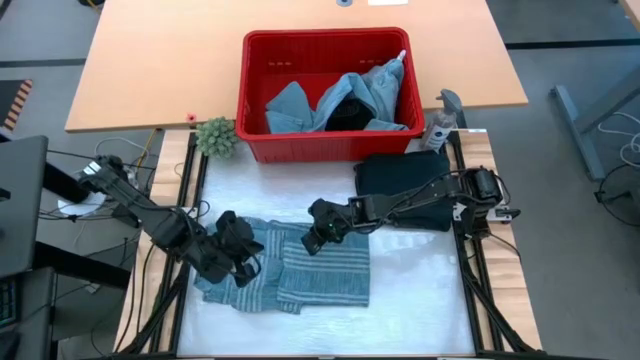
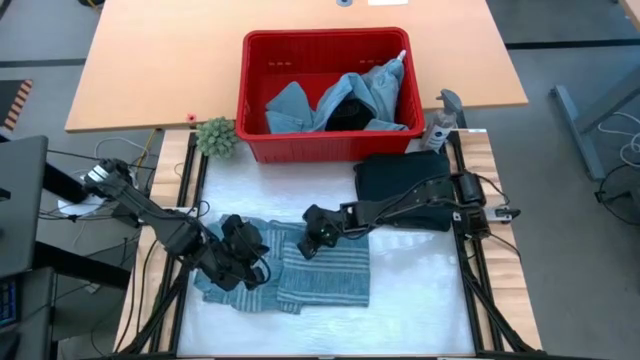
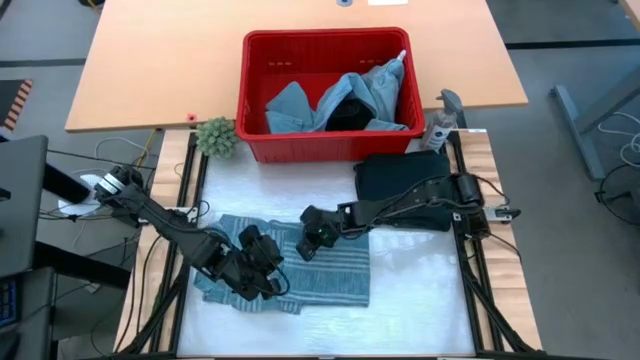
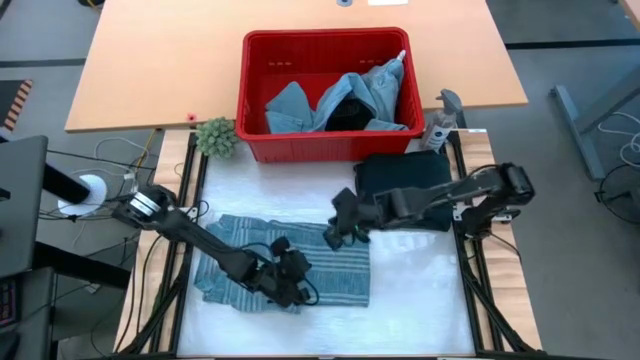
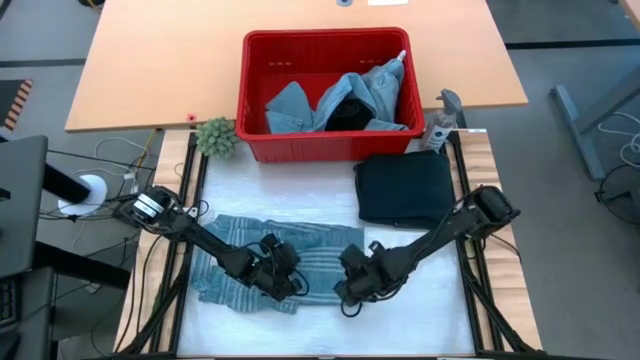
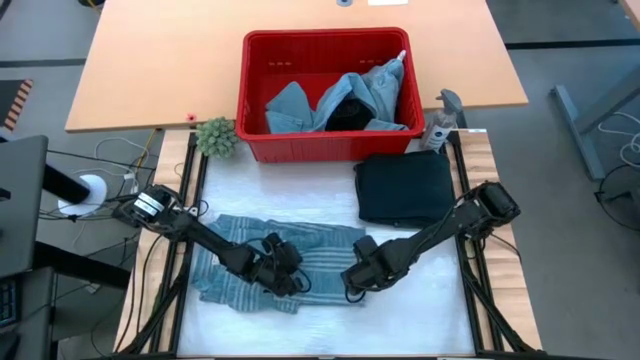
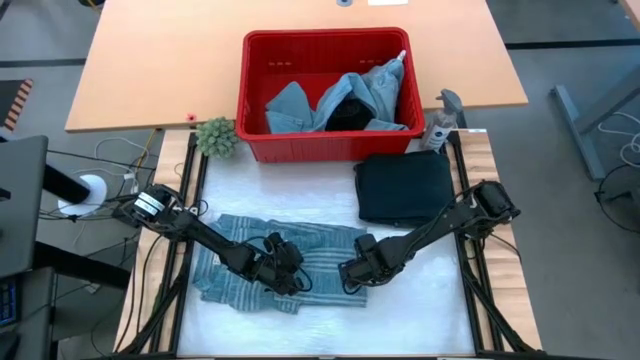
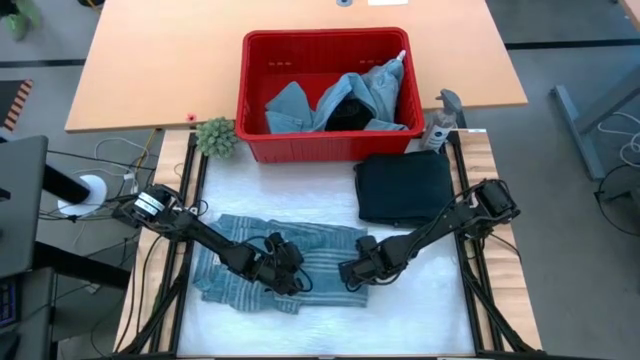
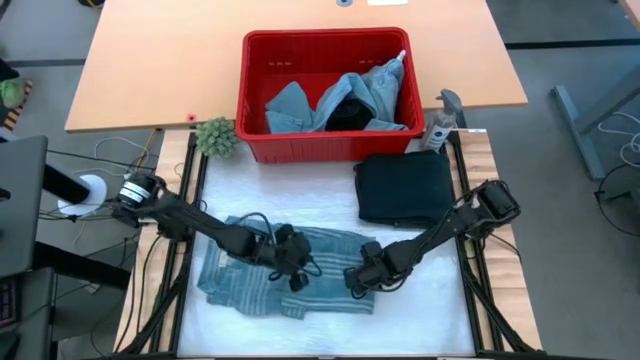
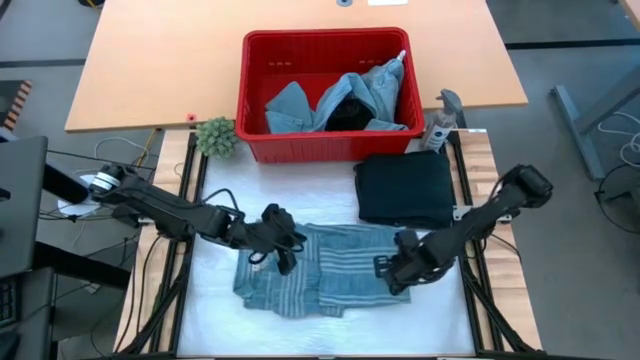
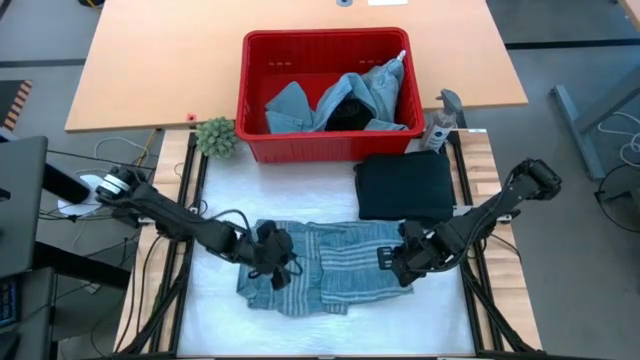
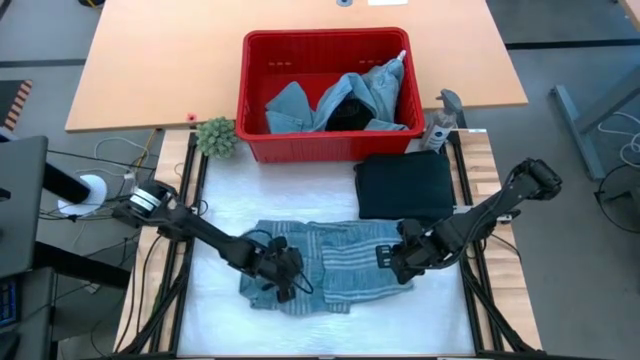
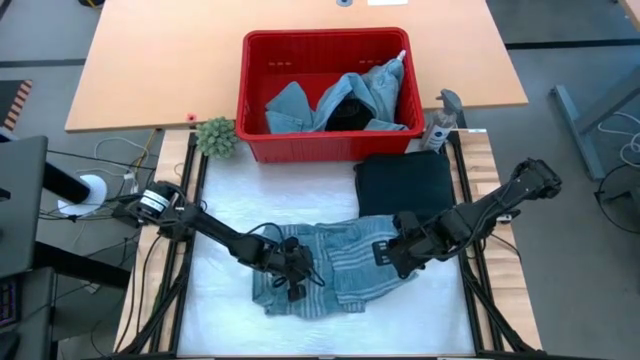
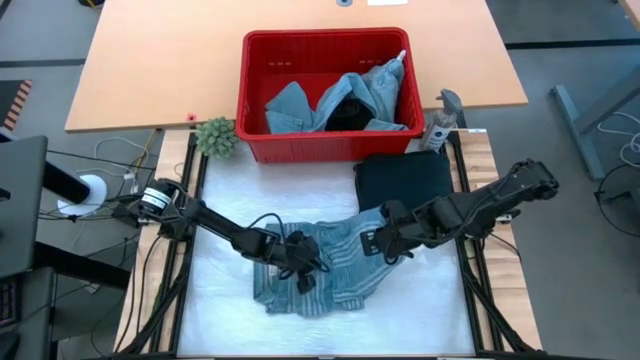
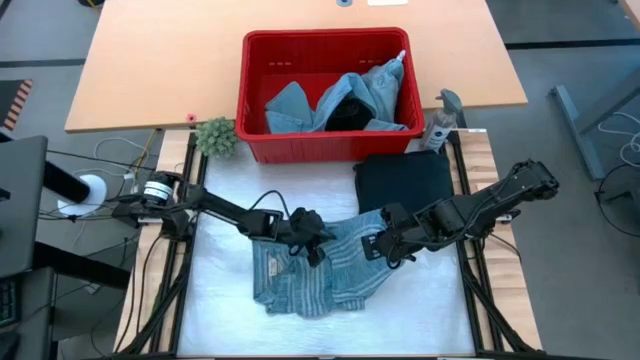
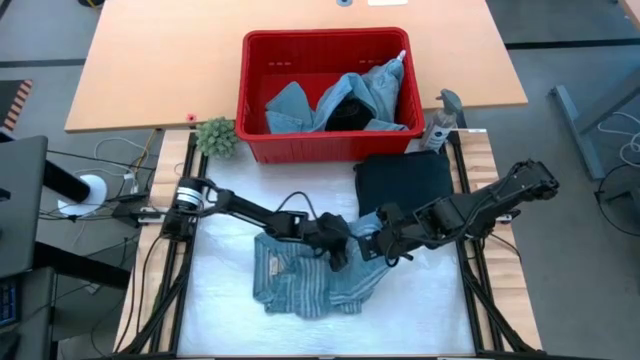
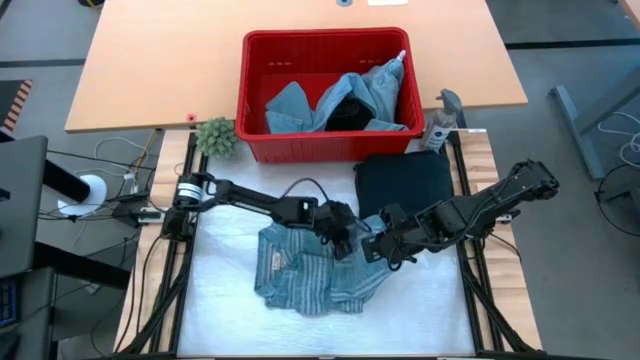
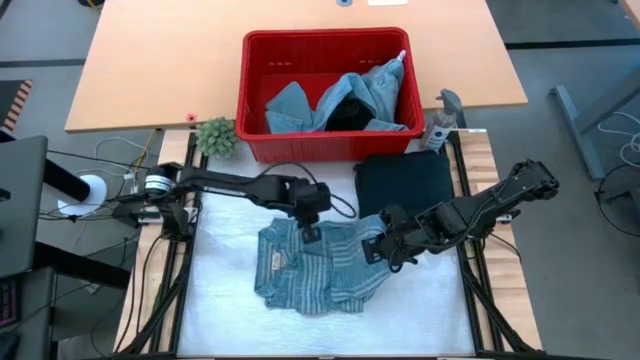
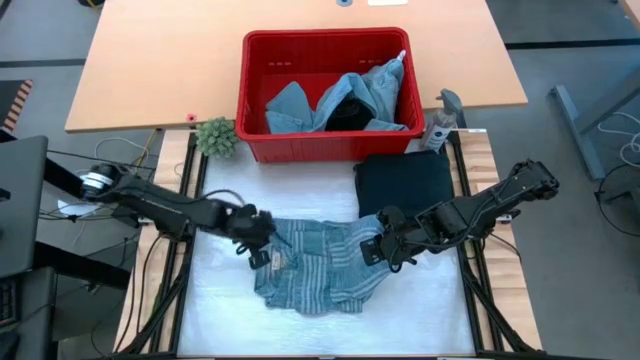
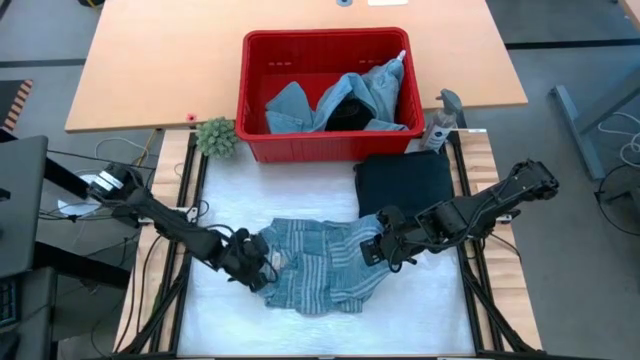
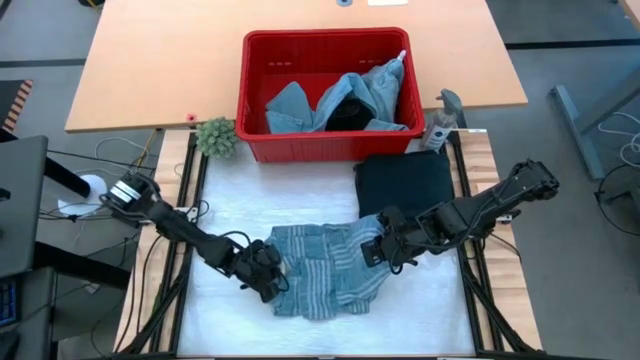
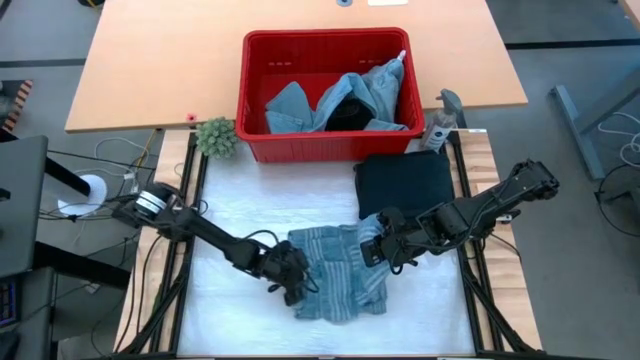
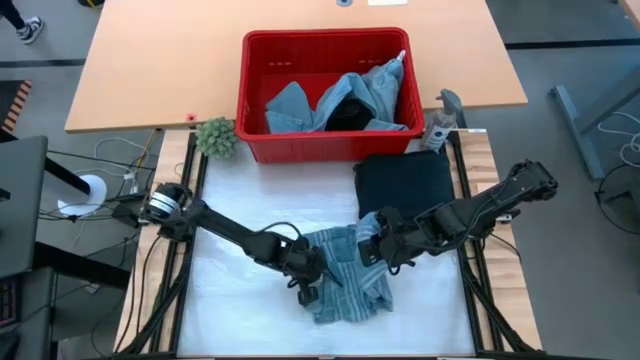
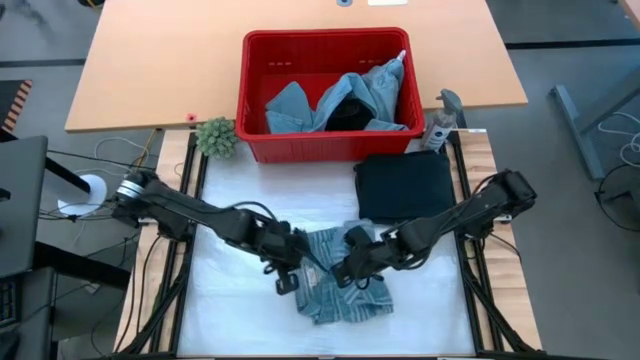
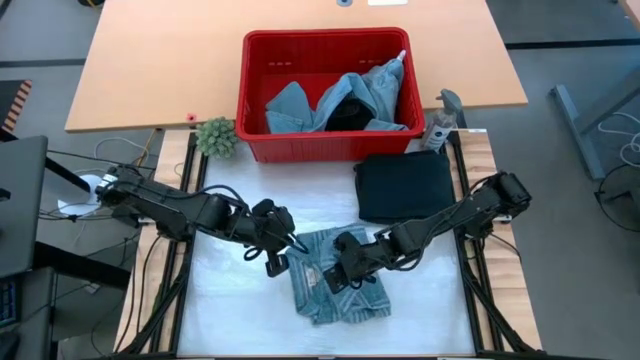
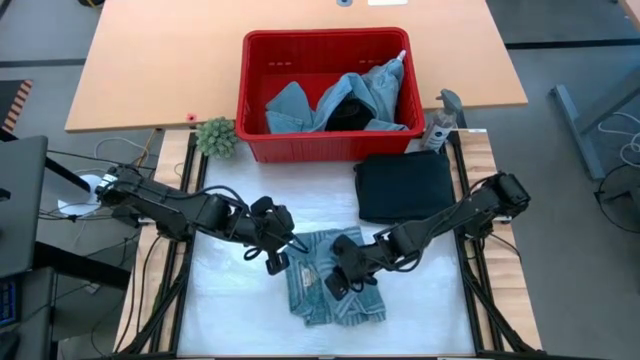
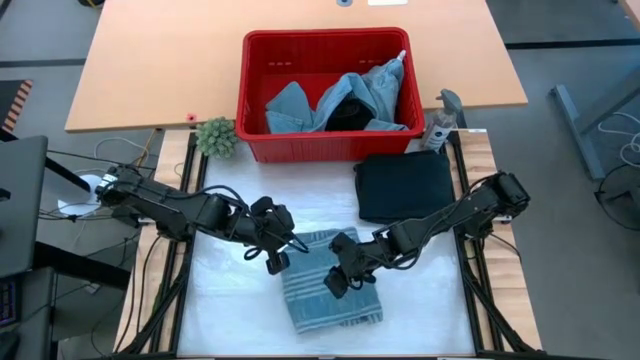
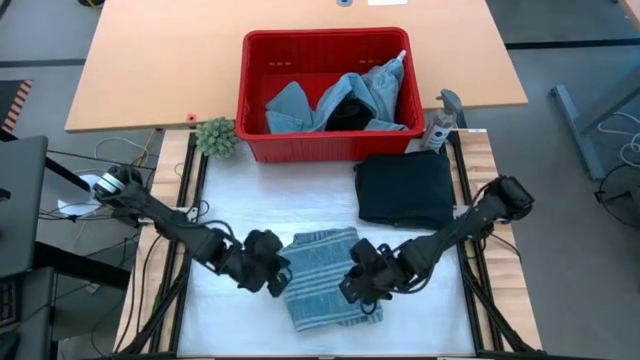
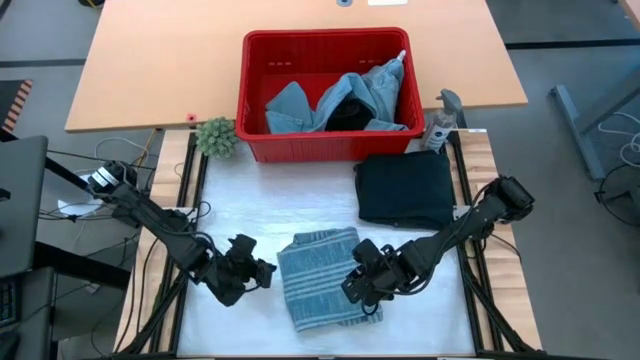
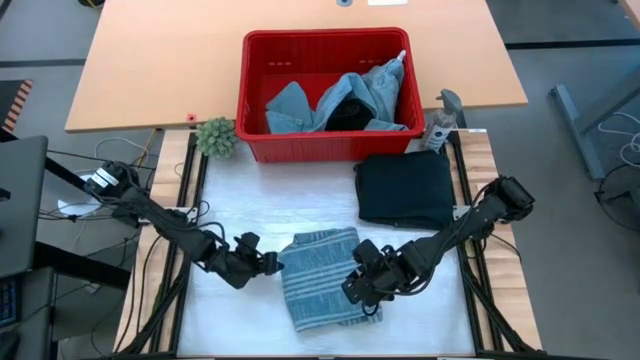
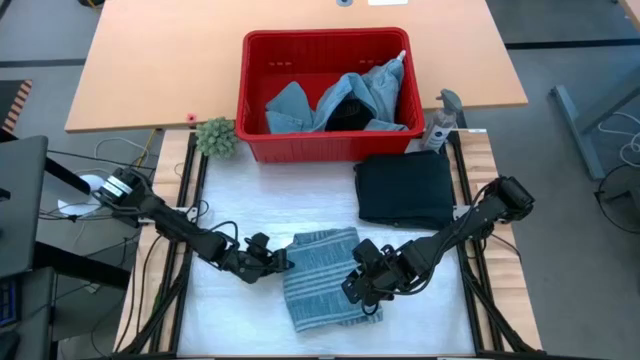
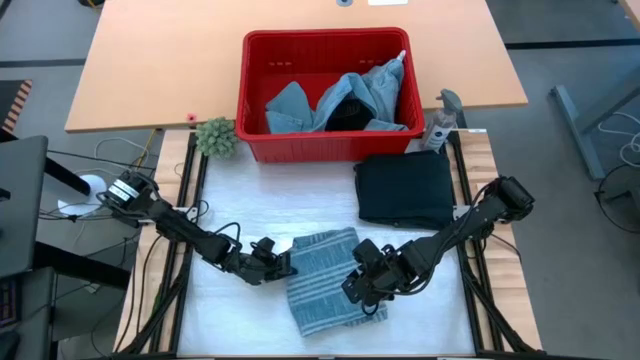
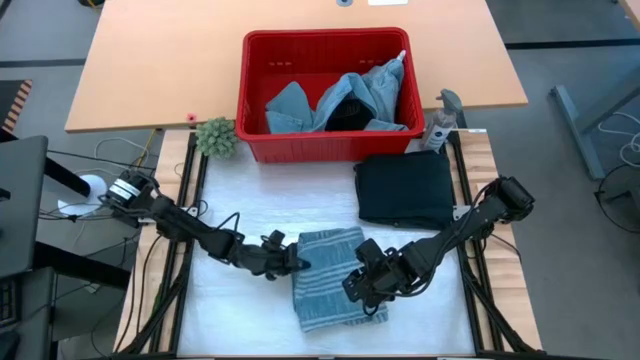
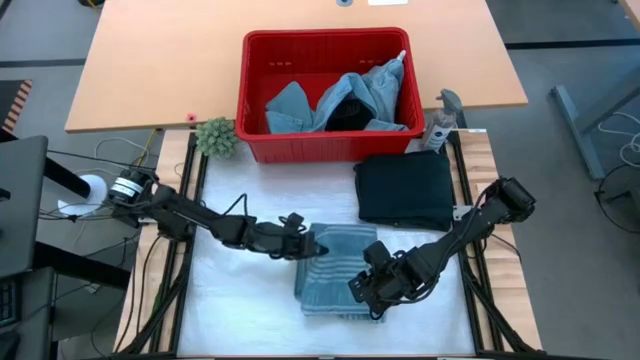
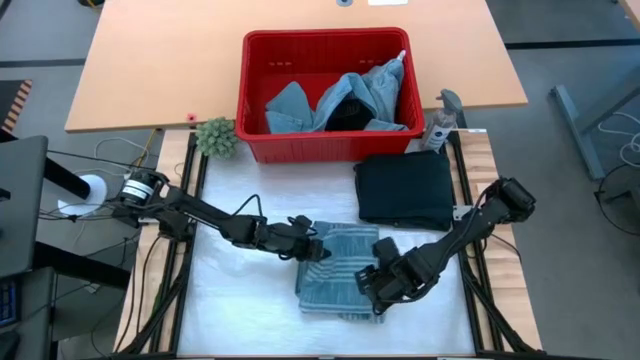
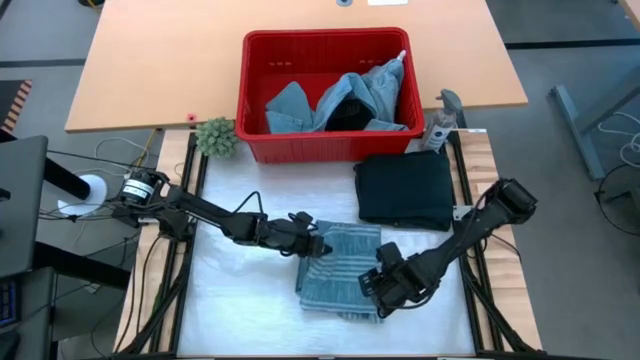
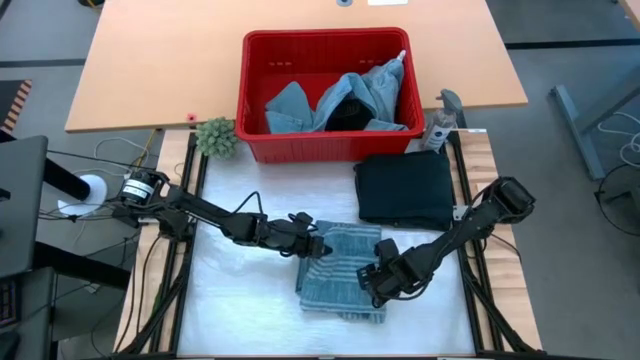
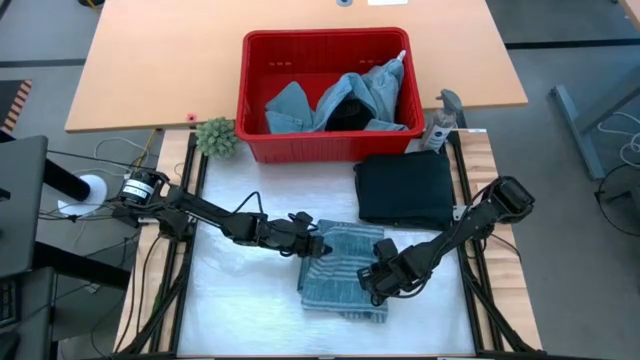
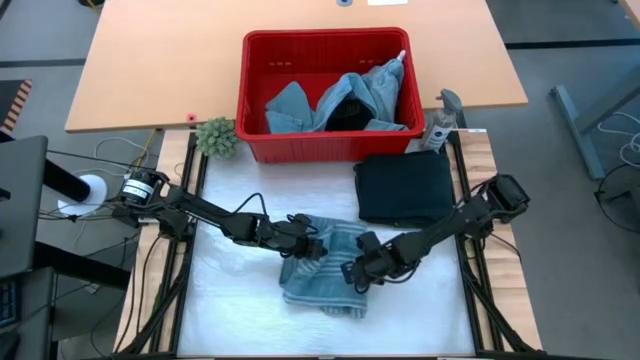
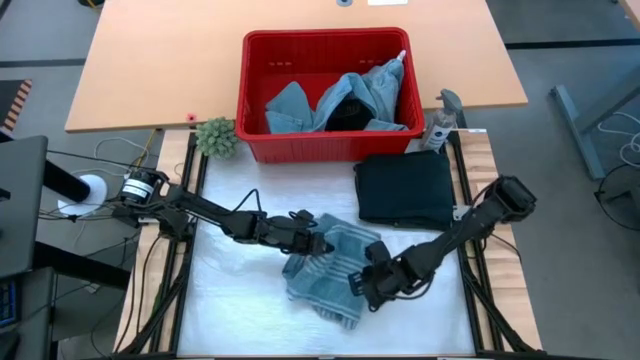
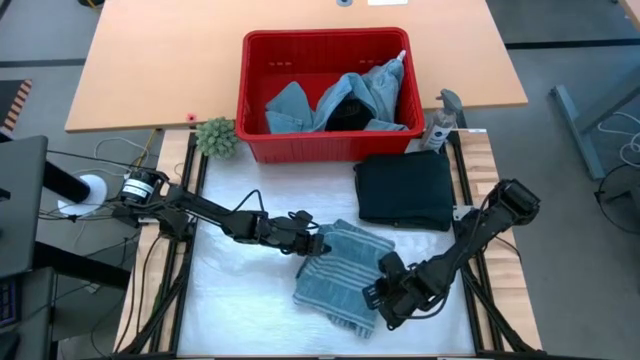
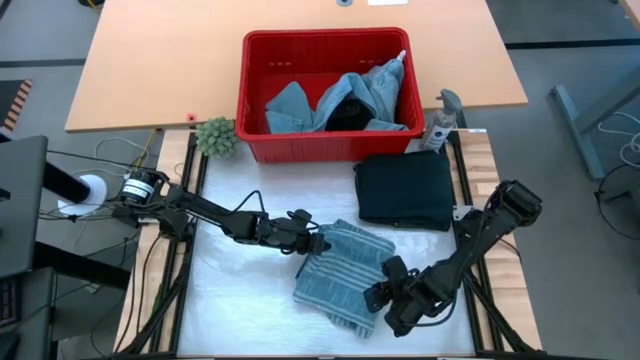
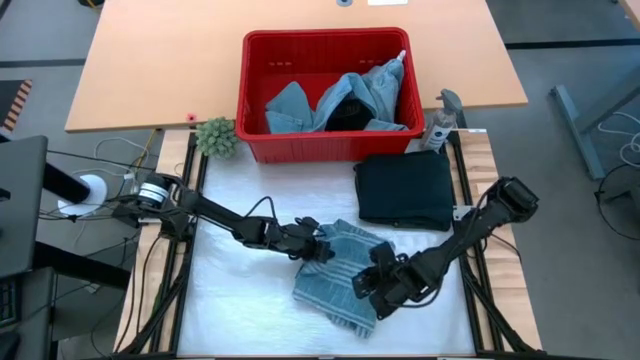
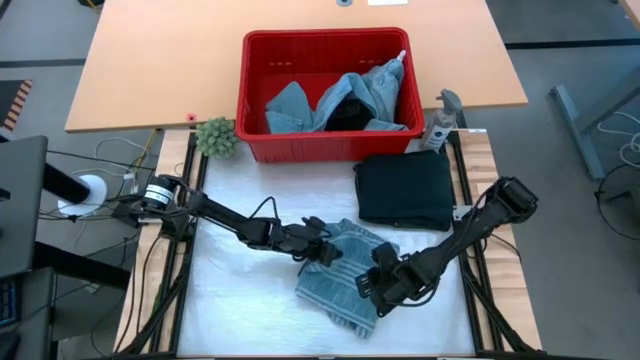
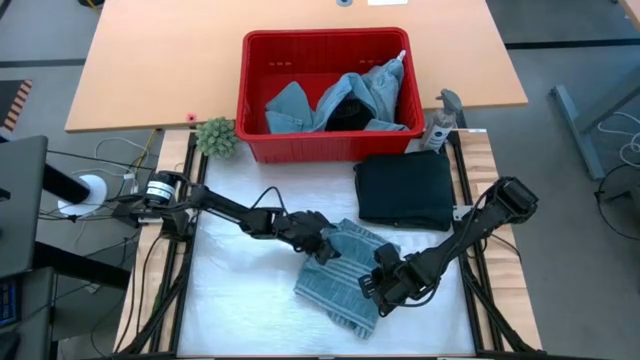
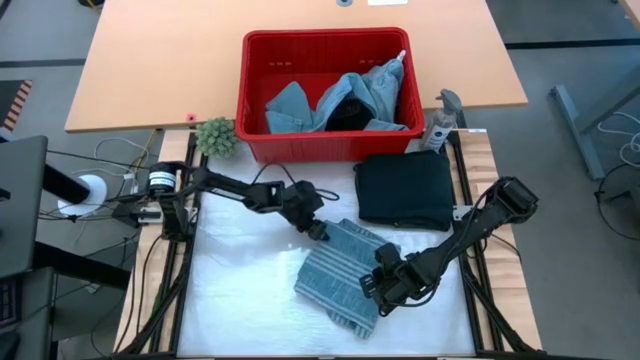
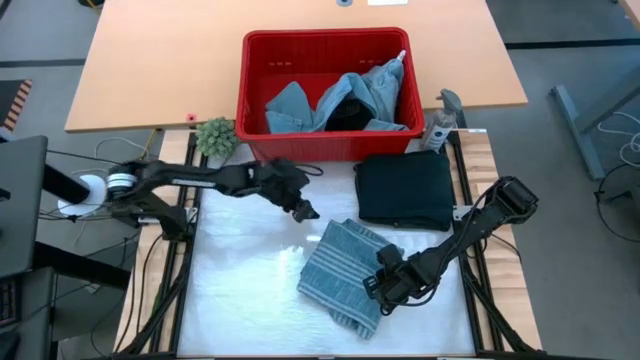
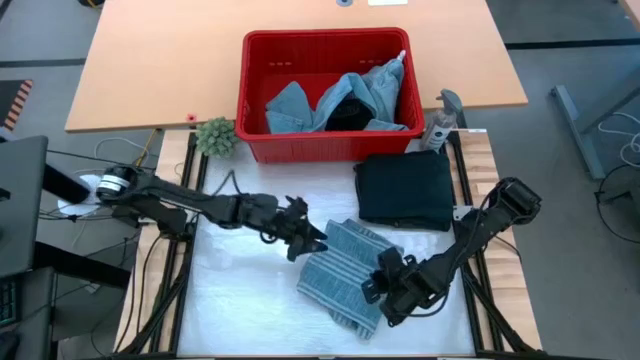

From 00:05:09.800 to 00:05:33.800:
Task: Fold Laundry from Bin
Fold the blue polo shirt
